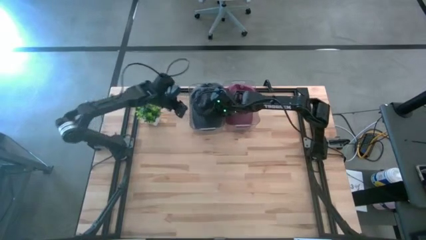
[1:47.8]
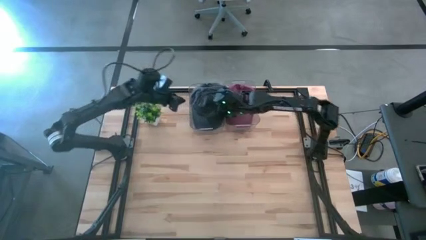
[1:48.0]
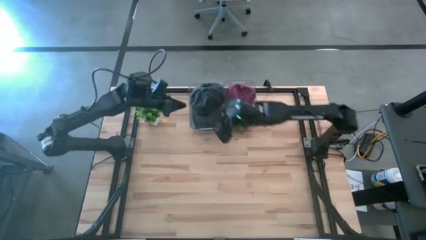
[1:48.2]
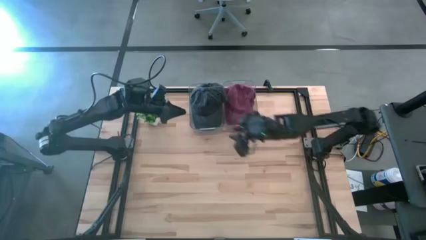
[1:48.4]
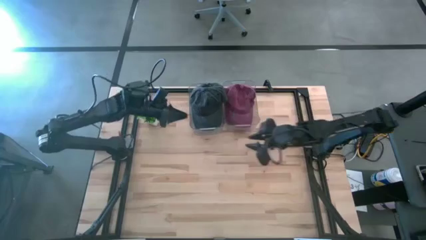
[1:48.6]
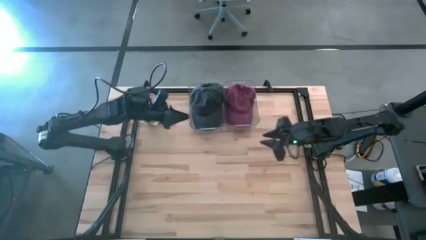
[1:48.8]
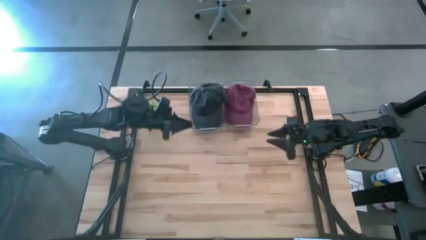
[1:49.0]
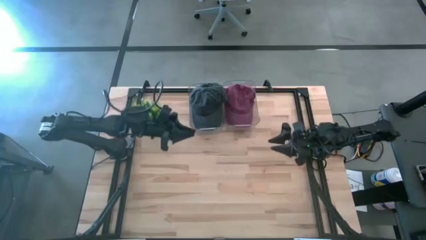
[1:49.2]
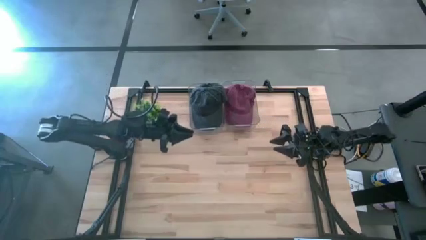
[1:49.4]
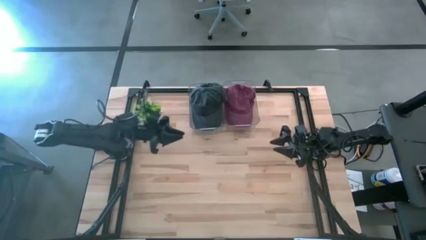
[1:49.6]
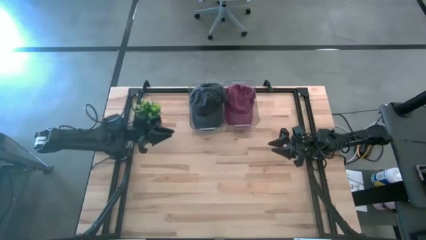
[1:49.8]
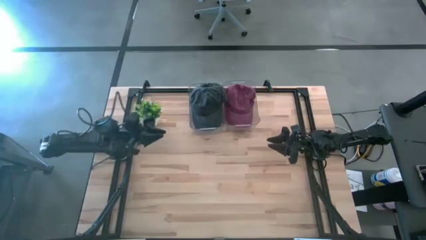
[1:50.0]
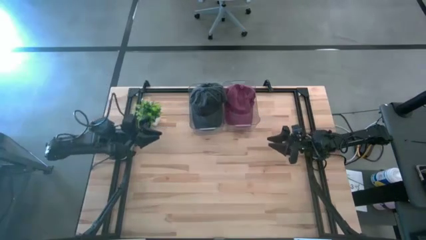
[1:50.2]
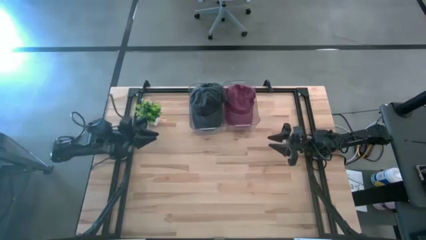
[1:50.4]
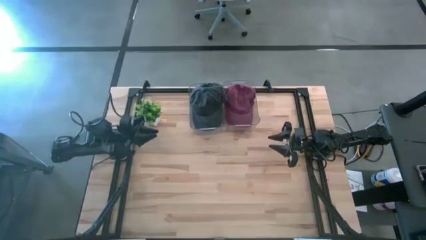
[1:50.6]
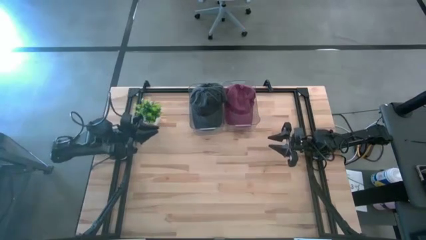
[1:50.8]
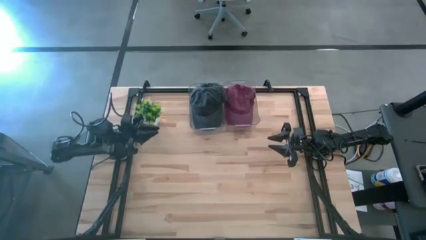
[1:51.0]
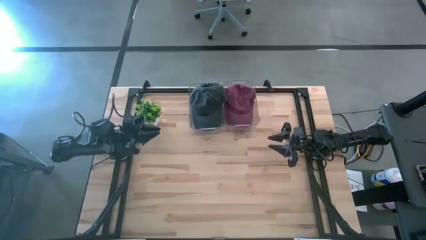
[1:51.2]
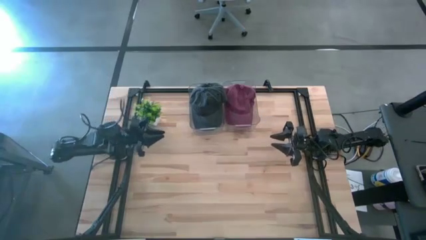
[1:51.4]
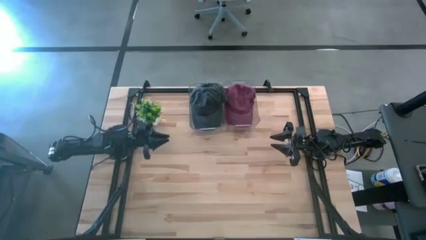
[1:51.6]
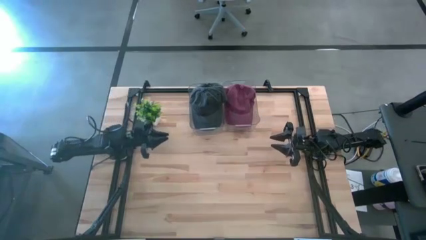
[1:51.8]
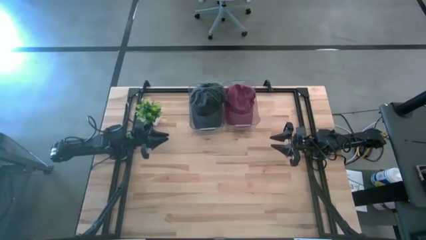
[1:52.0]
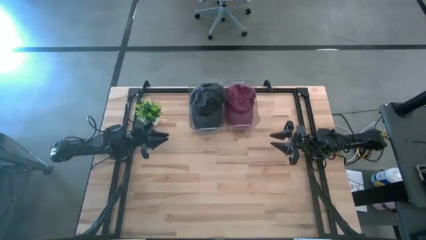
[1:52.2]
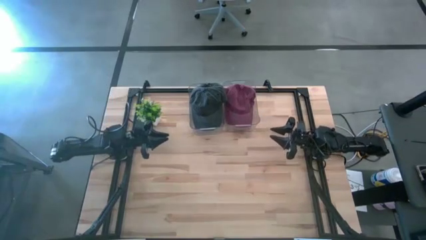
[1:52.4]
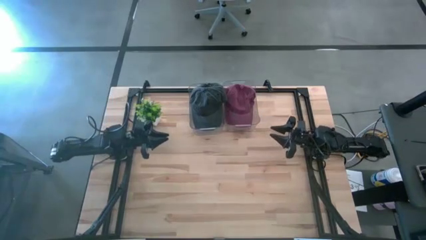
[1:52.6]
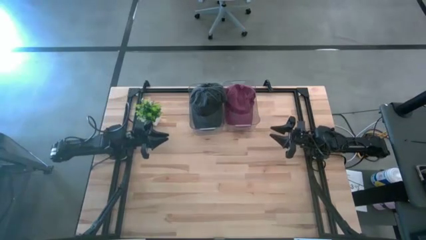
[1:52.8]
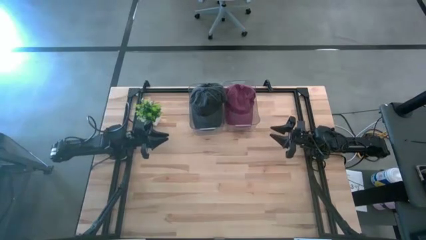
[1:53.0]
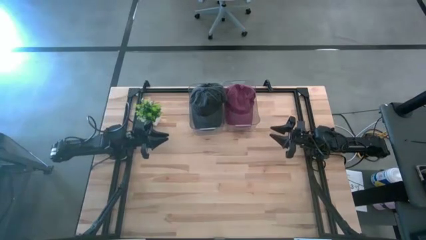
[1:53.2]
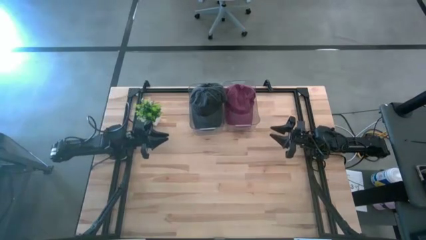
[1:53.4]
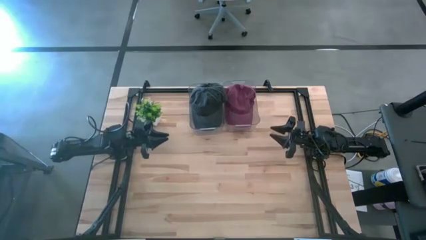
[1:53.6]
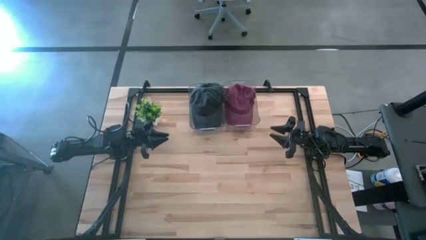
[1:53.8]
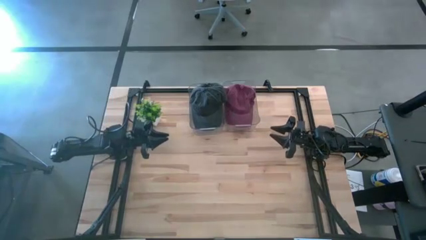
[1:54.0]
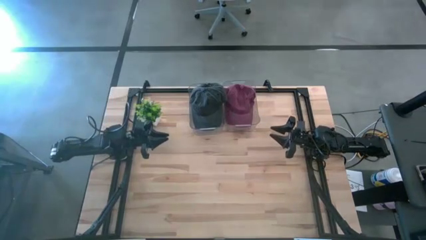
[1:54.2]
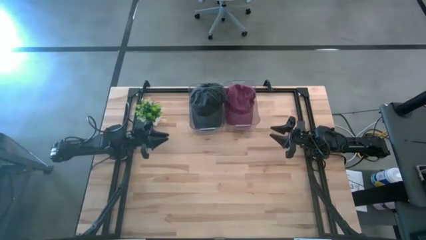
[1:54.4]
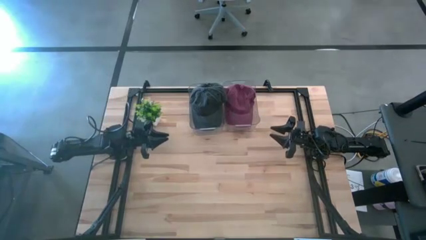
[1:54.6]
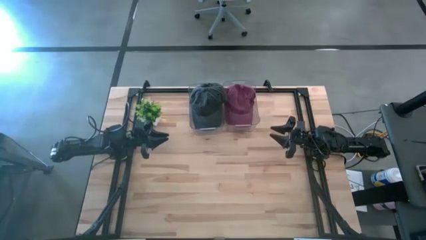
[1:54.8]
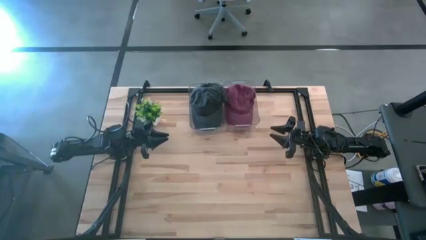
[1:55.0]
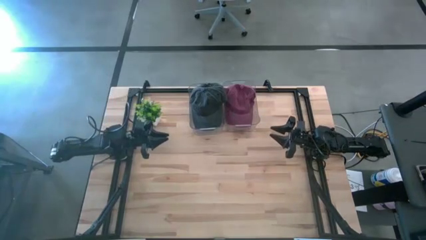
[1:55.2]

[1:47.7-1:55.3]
Task: Pick & Place hat
Return to Home Position

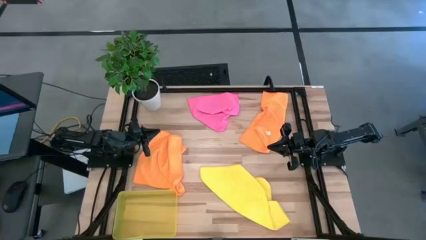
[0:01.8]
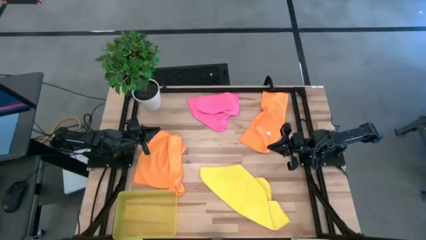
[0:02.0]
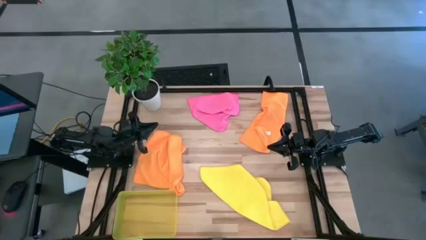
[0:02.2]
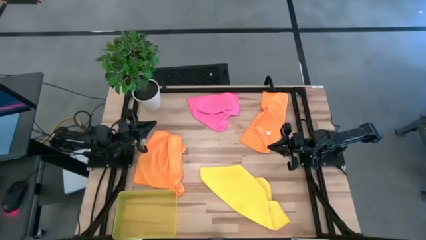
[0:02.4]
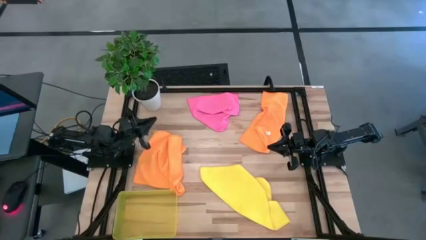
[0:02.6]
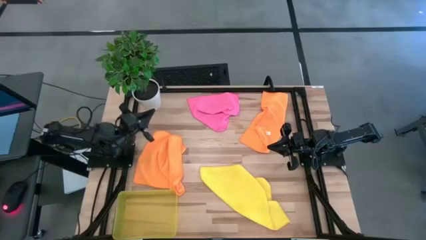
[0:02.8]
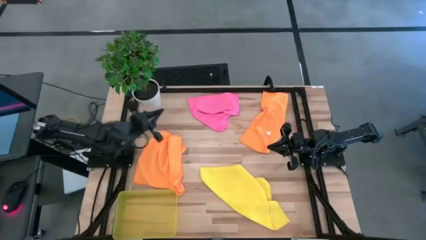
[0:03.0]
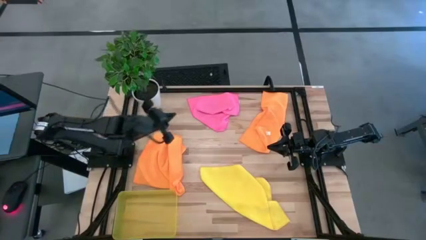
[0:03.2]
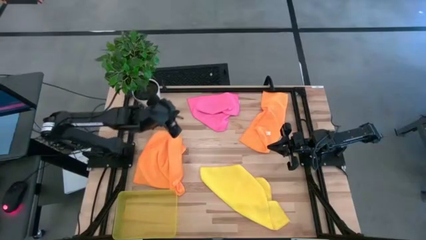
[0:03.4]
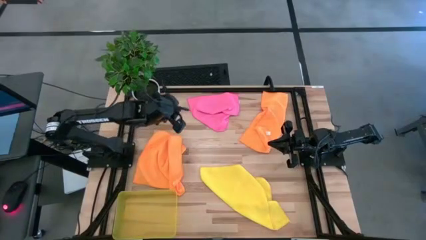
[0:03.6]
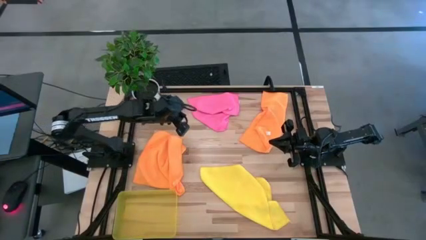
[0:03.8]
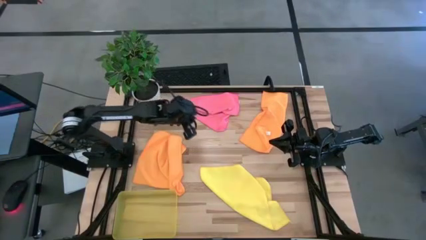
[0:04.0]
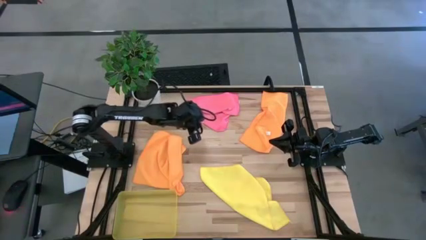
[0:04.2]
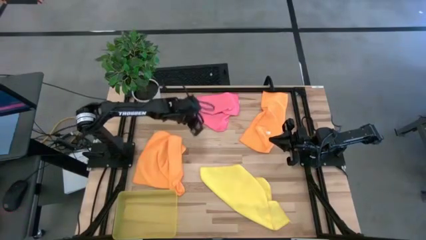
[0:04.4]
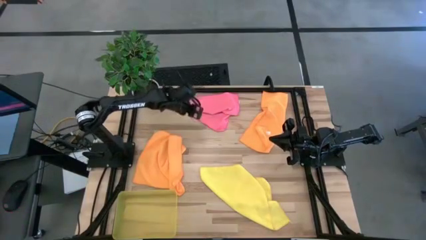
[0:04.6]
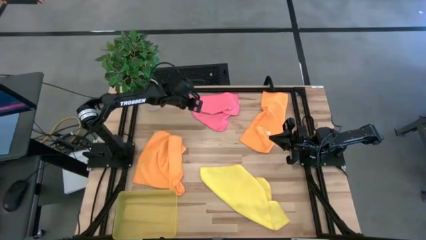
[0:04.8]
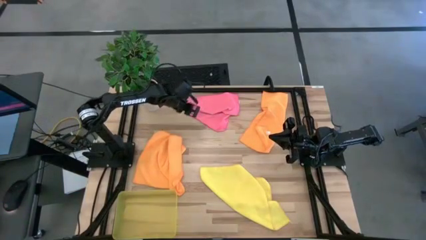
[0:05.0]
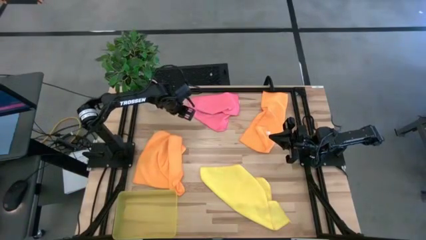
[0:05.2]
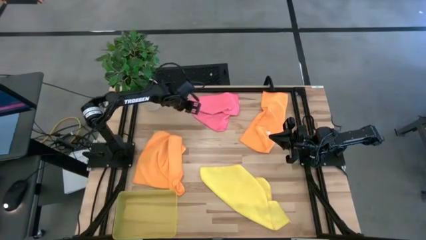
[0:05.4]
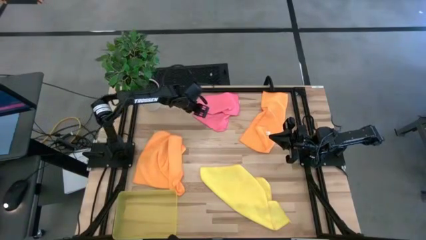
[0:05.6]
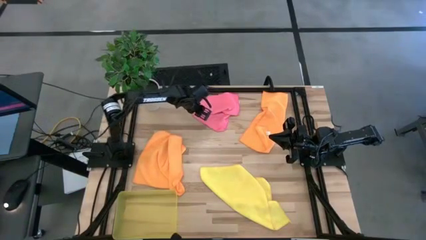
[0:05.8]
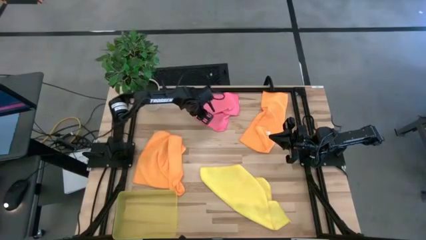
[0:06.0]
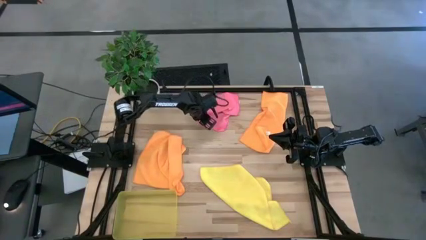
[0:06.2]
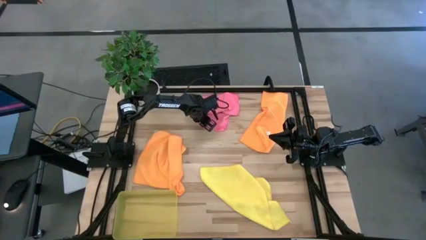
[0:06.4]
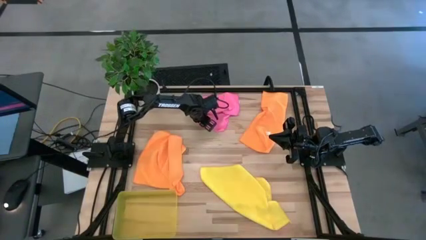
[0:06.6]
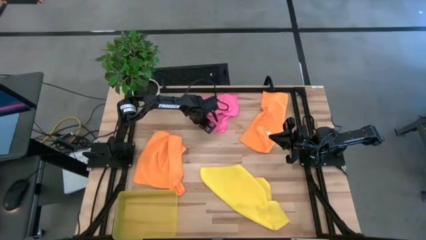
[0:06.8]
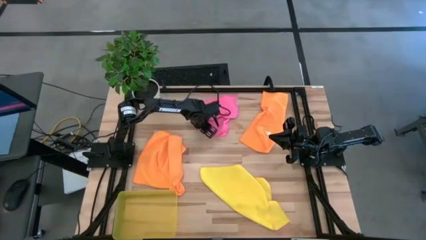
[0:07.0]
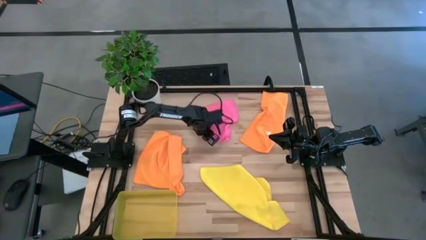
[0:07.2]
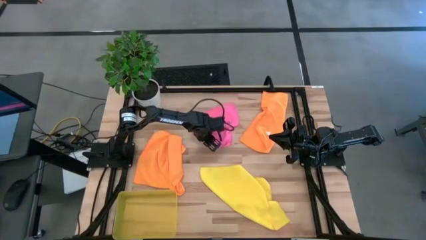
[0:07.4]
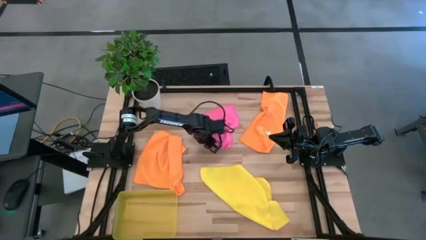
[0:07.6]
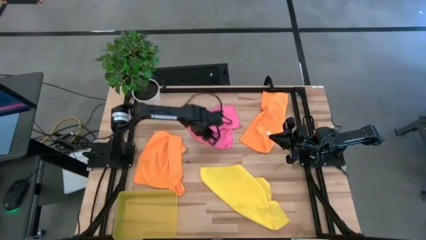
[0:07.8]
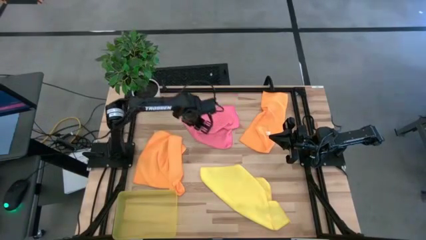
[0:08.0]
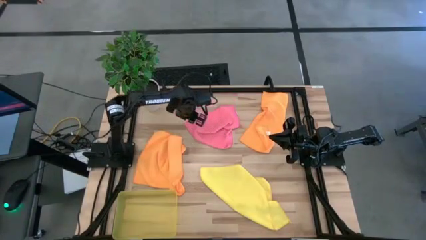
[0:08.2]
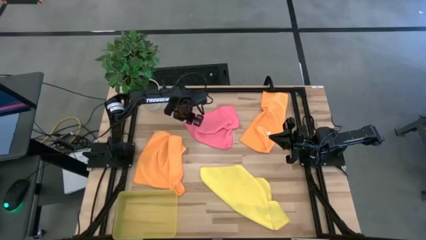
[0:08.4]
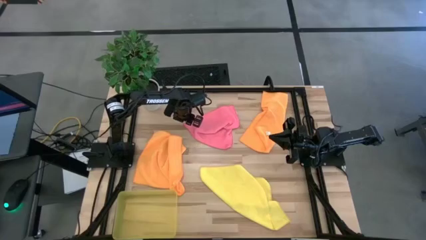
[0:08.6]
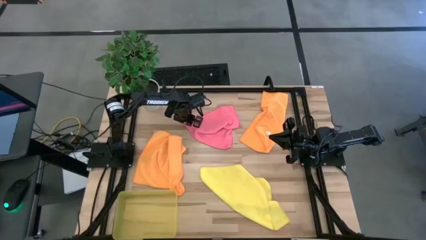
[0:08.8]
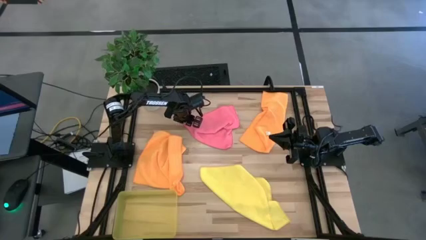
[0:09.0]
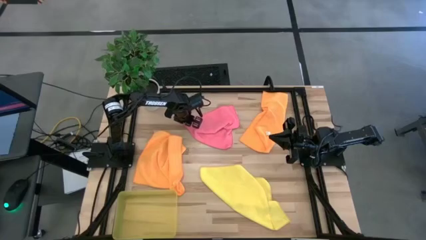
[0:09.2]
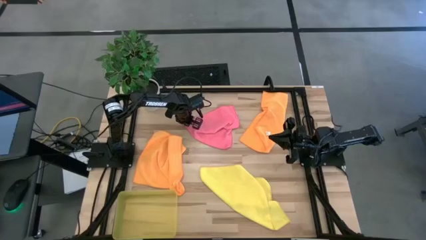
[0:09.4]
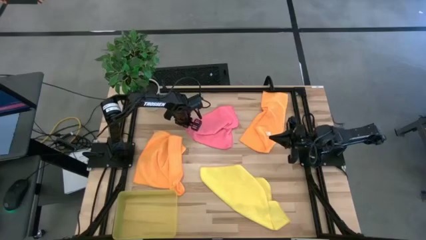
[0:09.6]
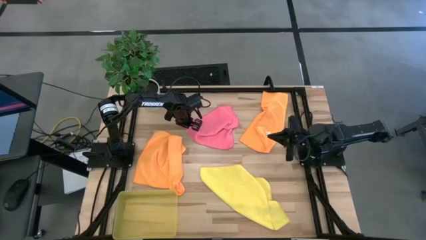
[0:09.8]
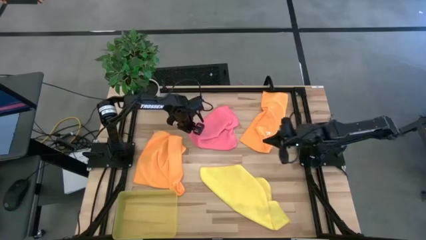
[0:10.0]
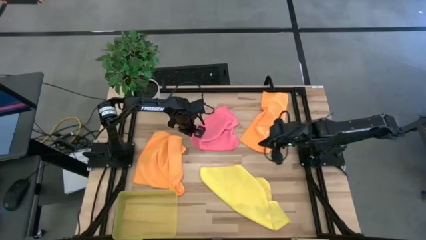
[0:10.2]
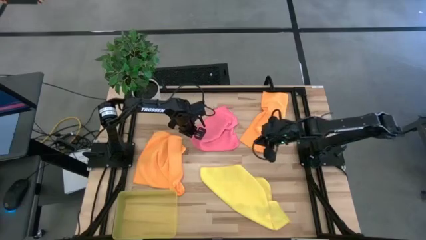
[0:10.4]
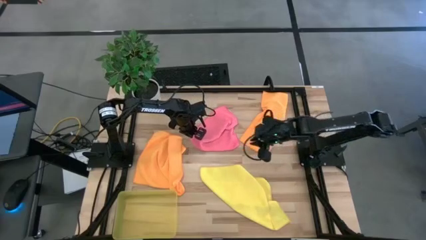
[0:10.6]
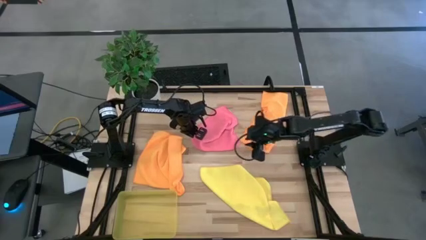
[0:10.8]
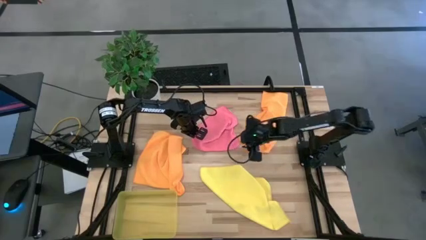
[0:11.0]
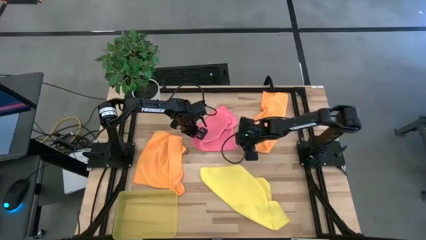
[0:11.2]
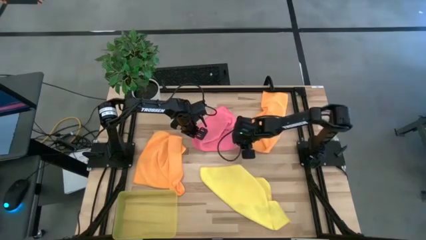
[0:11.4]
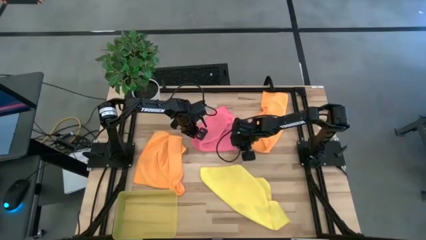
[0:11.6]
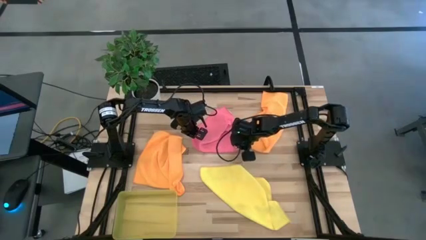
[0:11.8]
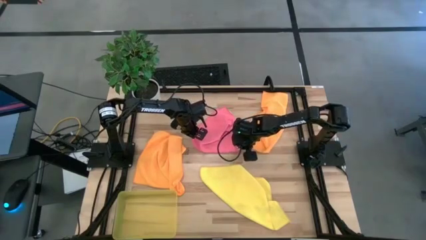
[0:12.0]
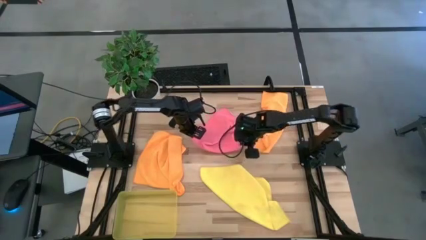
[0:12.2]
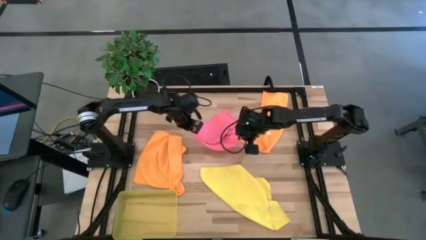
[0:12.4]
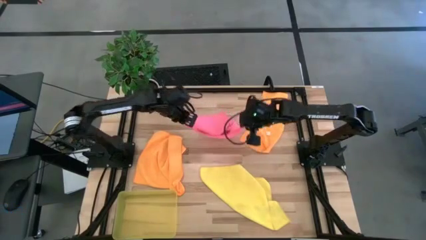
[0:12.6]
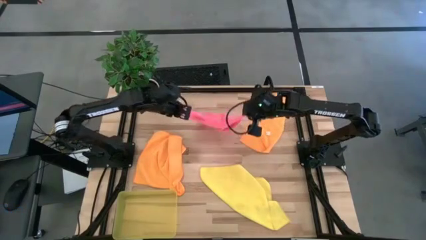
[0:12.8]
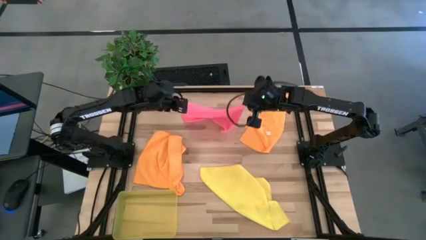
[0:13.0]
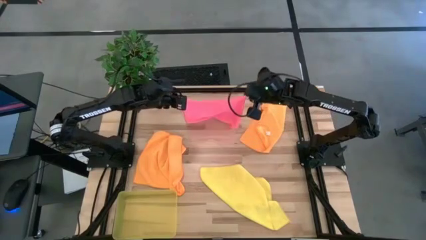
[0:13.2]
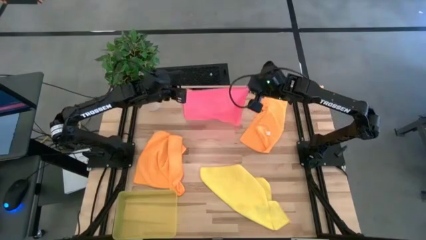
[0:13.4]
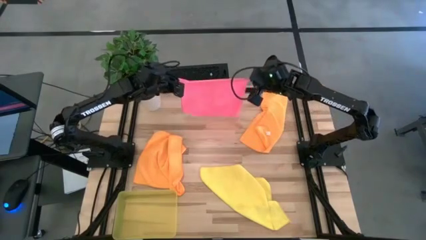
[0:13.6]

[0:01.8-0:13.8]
Task: Fold microfiber towels
Fold the pink microfiber towel
